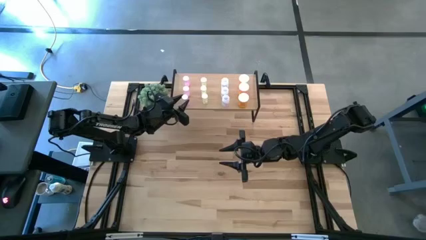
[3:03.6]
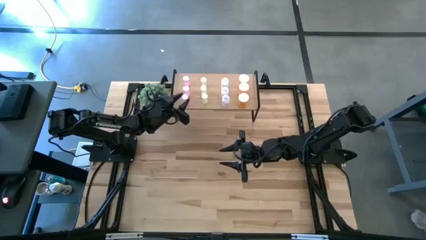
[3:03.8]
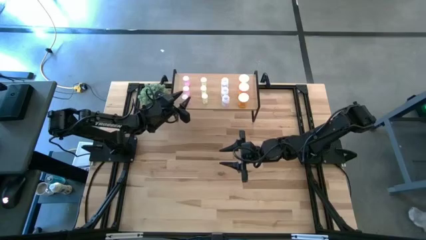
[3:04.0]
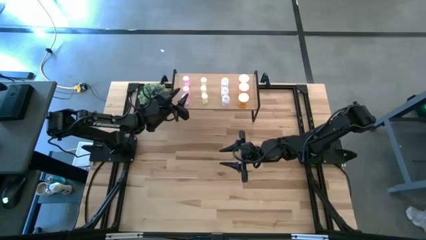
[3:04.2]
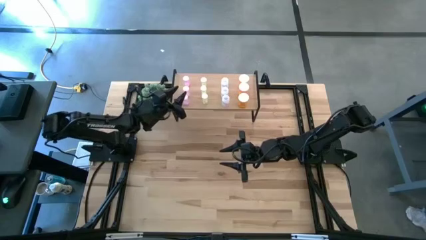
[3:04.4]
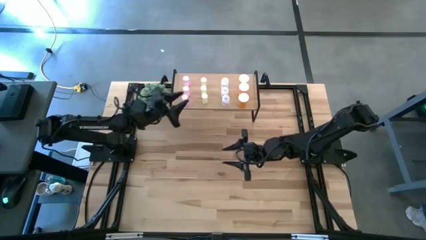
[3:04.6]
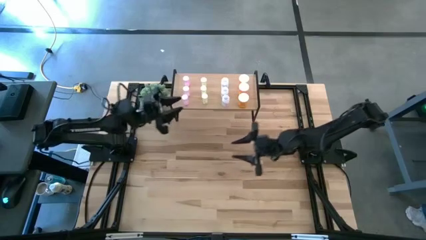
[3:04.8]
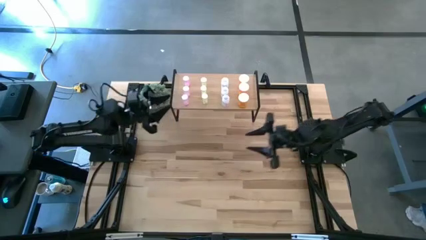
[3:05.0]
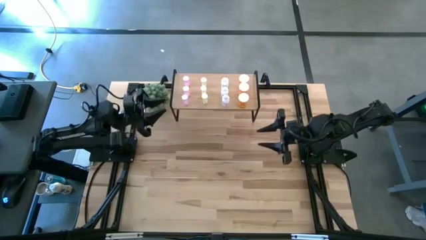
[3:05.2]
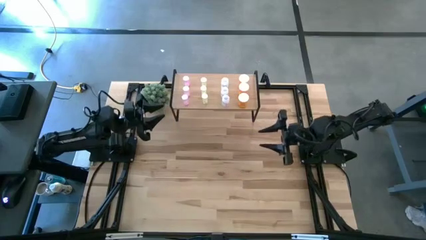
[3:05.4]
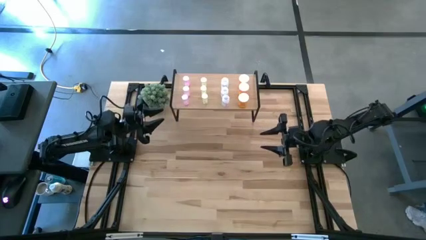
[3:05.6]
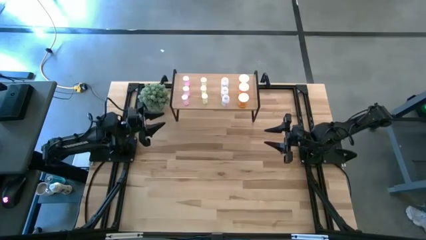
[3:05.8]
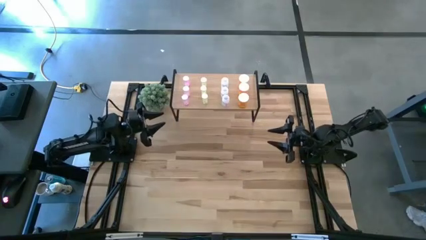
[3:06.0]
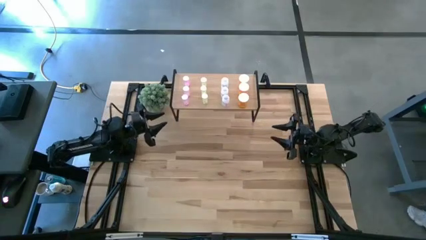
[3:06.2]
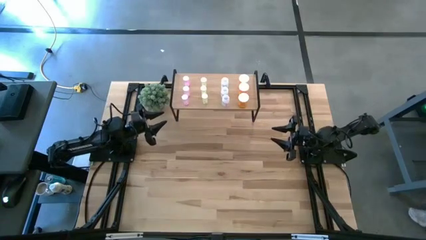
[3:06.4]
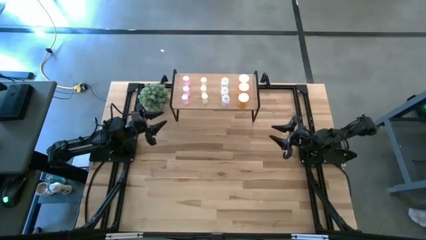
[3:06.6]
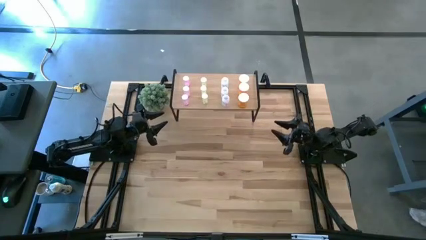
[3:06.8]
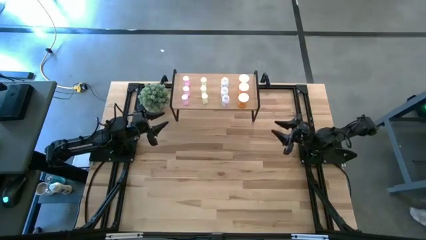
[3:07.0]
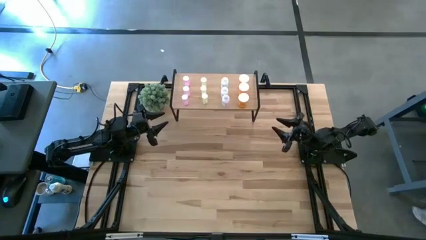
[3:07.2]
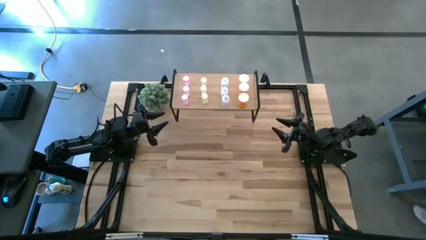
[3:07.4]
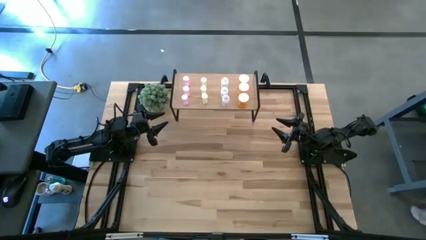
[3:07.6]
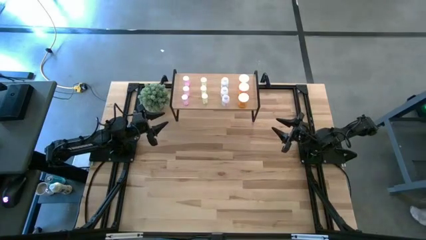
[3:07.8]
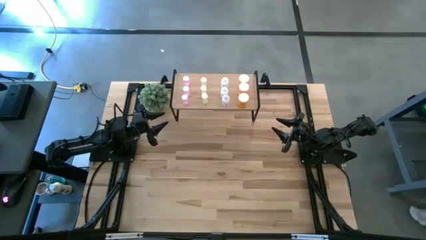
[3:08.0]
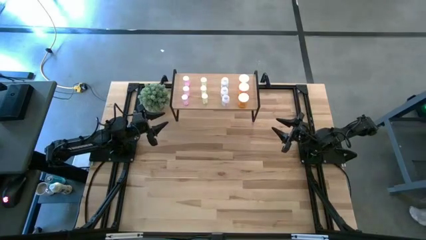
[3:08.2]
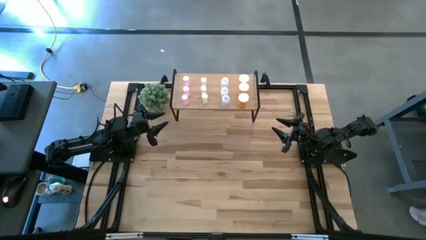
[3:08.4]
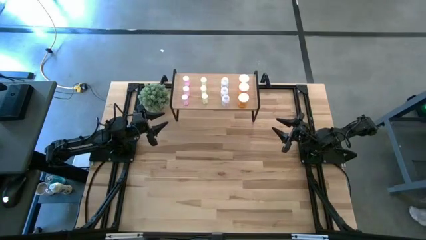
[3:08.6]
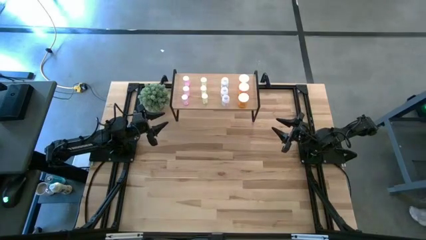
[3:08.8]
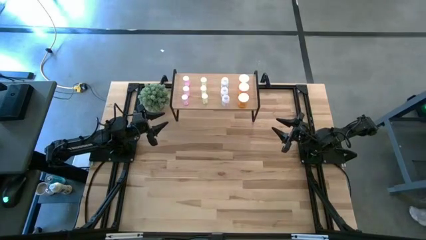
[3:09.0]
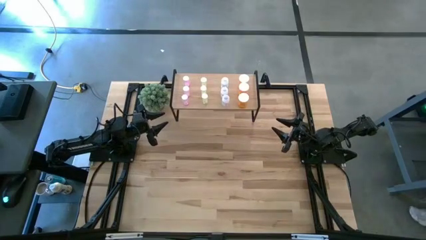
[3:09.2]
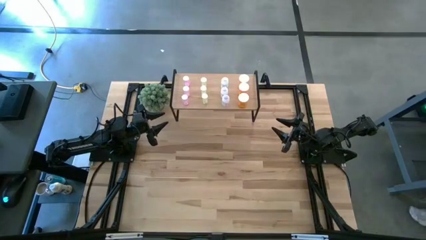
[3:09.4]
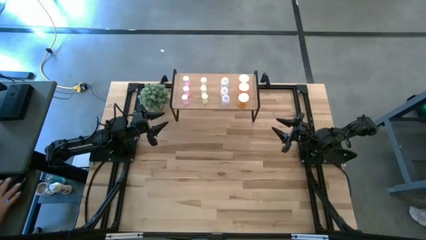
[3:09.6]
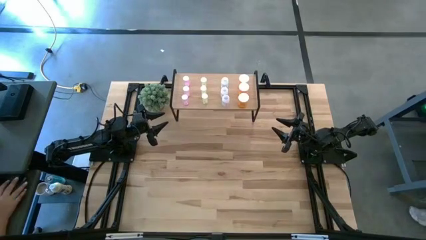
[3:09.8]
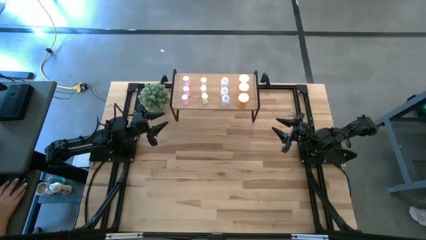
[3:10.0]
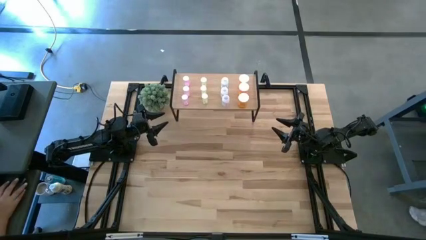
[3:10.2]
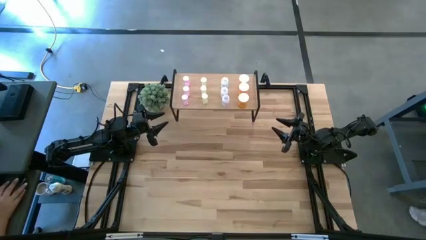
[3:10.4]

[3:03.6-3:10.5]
Task: Pick and place medicine bottles onto shelf by color
Return to Home position

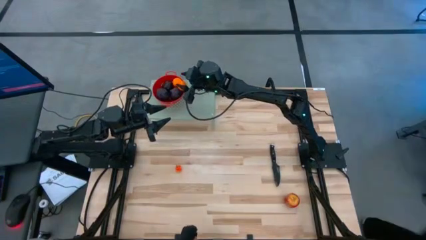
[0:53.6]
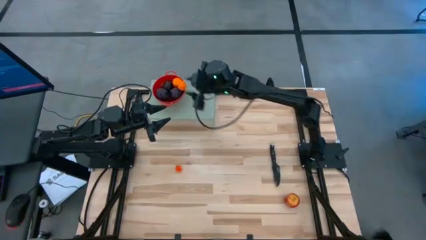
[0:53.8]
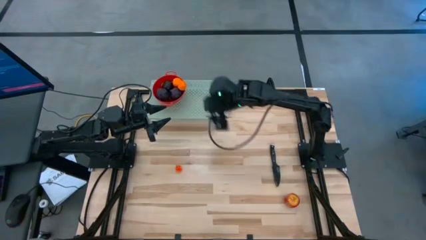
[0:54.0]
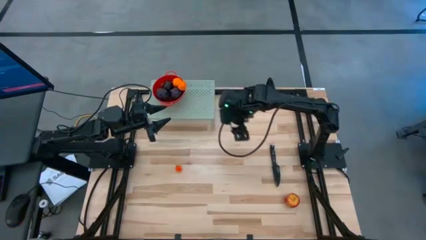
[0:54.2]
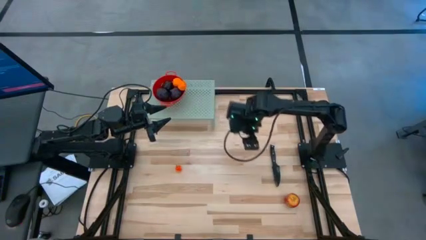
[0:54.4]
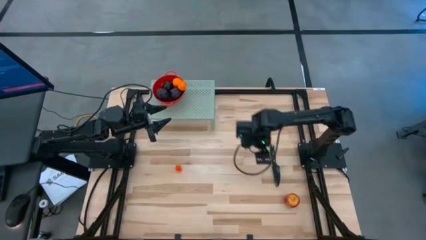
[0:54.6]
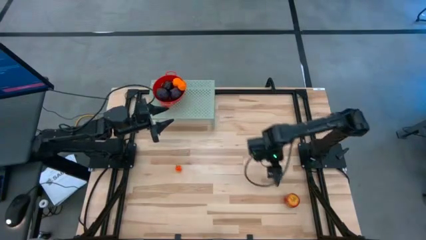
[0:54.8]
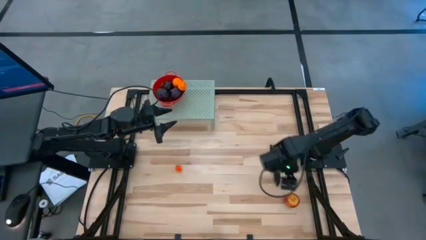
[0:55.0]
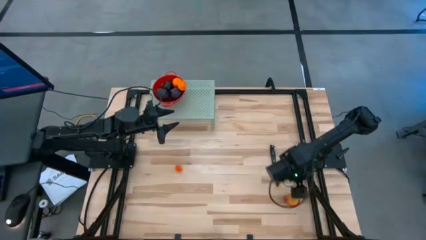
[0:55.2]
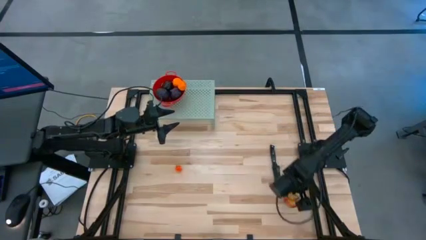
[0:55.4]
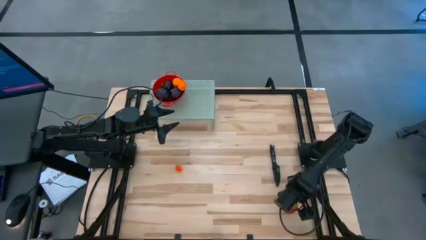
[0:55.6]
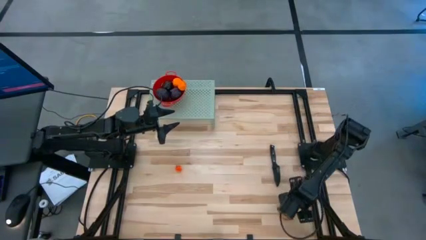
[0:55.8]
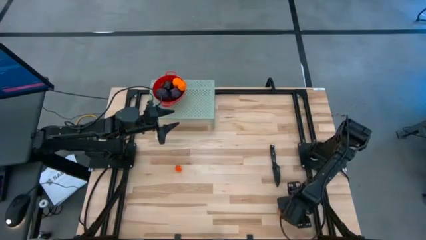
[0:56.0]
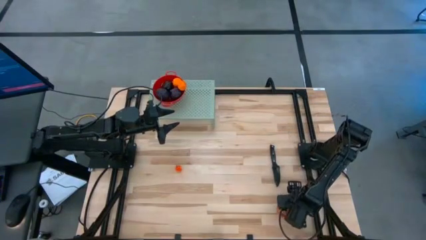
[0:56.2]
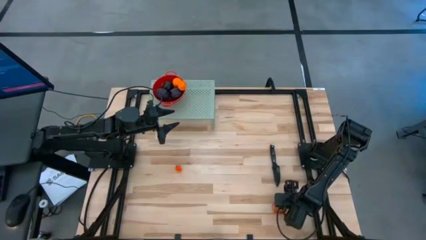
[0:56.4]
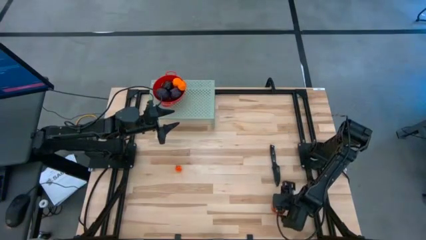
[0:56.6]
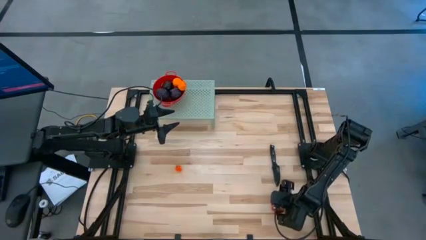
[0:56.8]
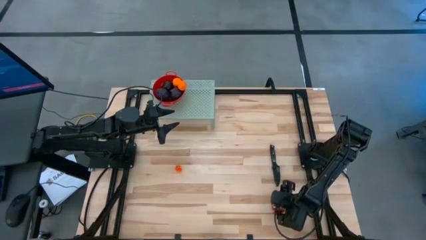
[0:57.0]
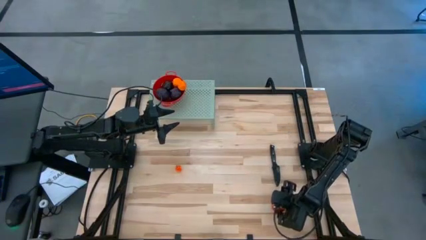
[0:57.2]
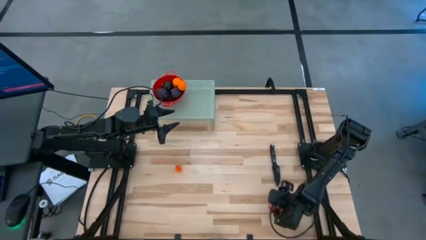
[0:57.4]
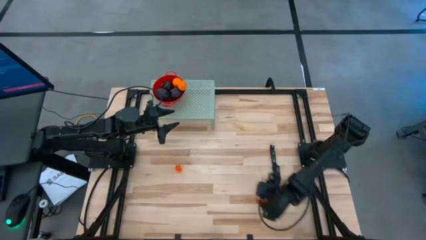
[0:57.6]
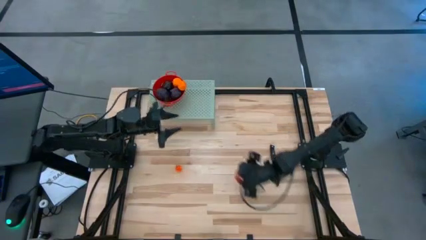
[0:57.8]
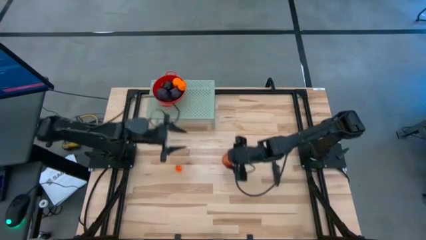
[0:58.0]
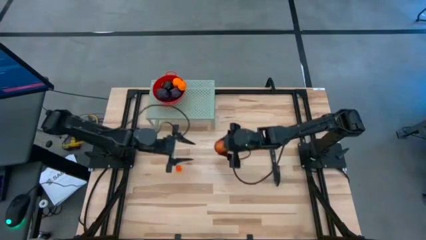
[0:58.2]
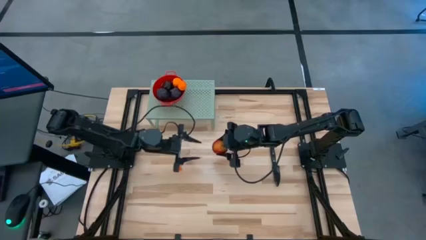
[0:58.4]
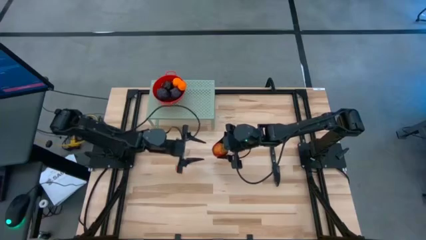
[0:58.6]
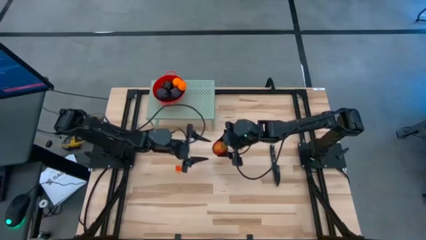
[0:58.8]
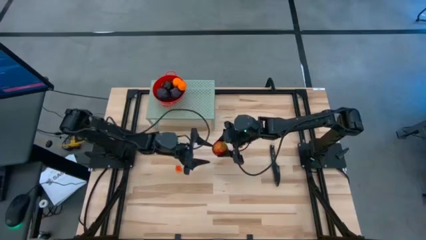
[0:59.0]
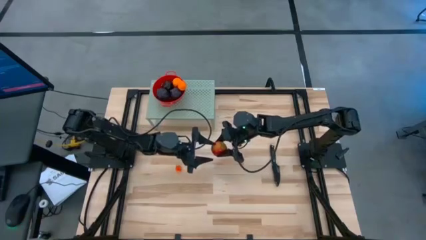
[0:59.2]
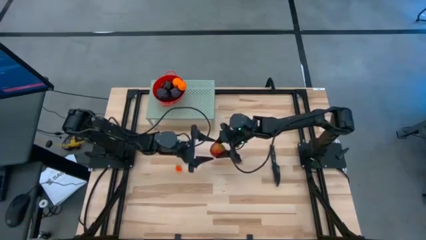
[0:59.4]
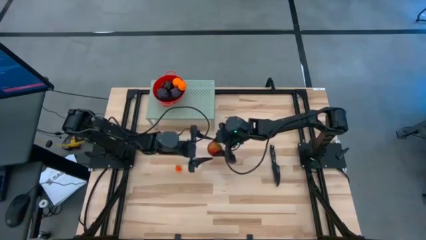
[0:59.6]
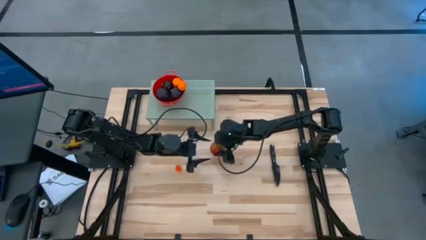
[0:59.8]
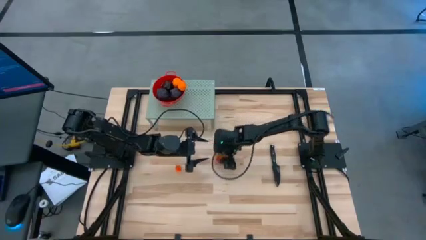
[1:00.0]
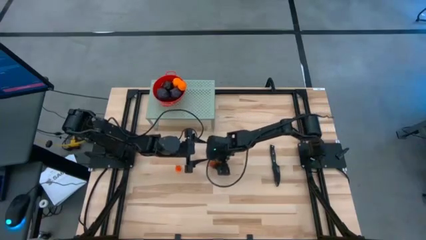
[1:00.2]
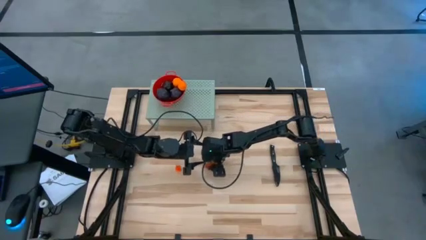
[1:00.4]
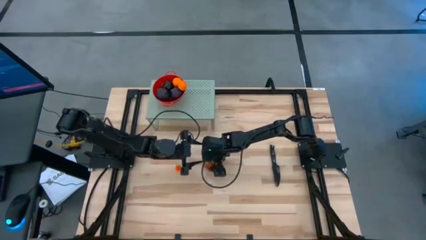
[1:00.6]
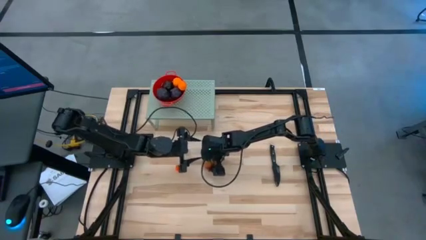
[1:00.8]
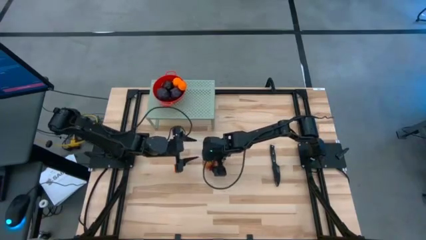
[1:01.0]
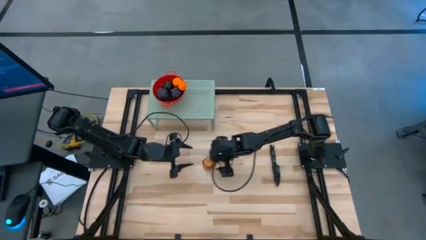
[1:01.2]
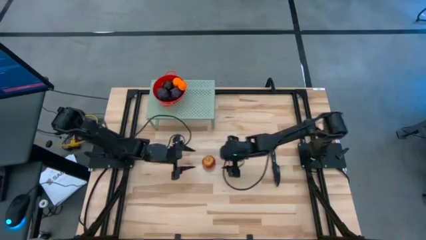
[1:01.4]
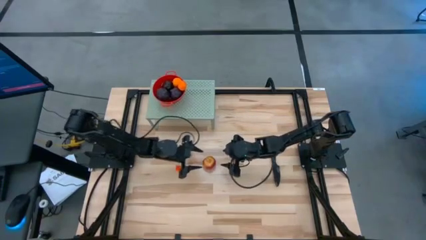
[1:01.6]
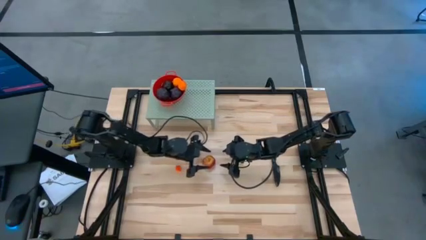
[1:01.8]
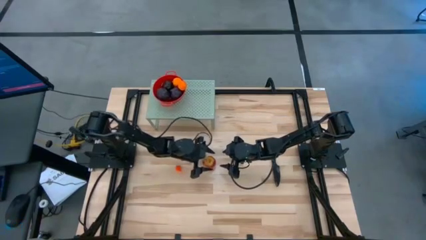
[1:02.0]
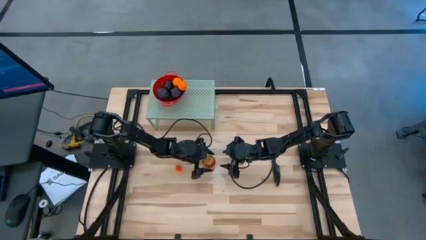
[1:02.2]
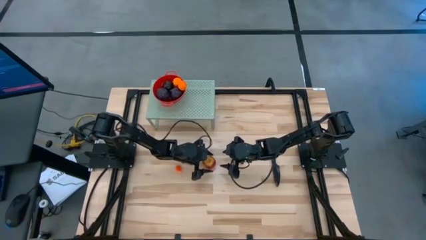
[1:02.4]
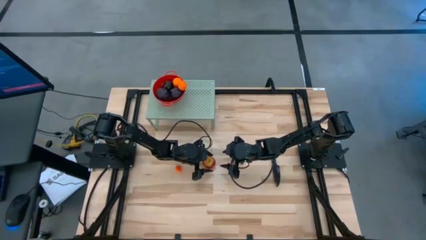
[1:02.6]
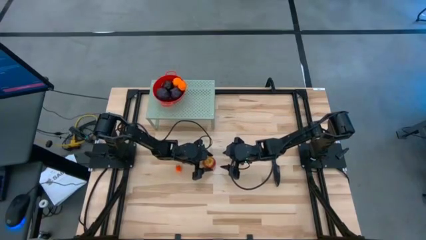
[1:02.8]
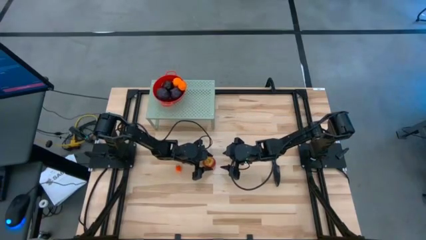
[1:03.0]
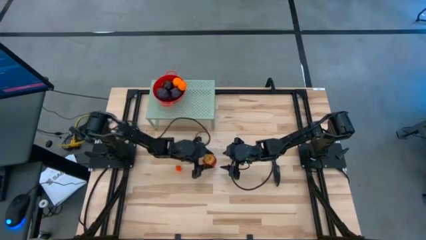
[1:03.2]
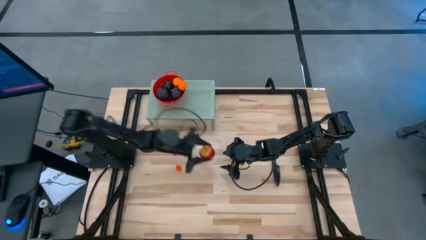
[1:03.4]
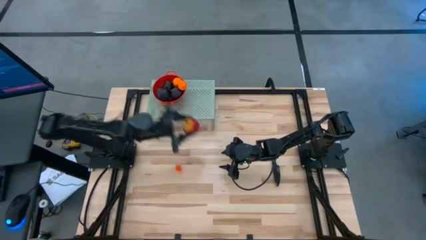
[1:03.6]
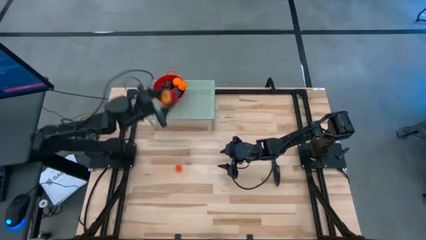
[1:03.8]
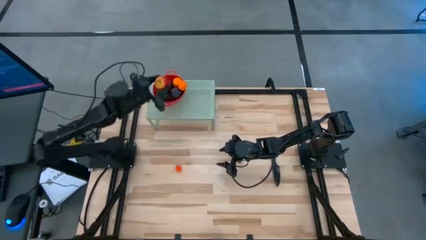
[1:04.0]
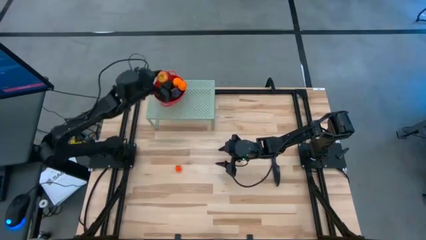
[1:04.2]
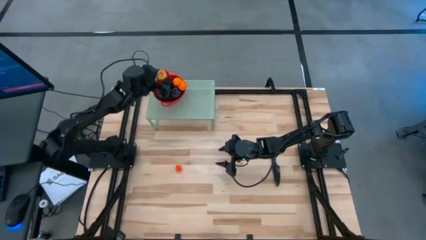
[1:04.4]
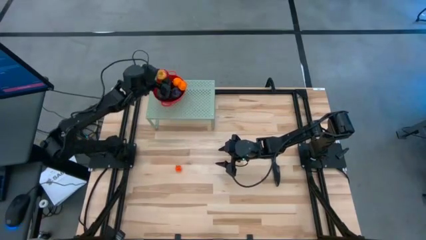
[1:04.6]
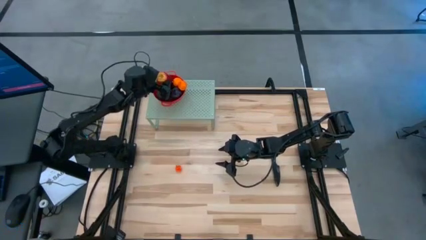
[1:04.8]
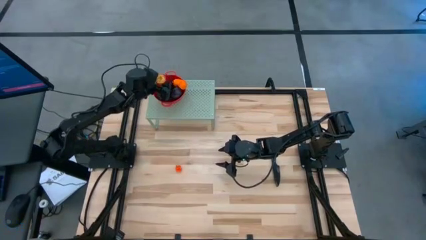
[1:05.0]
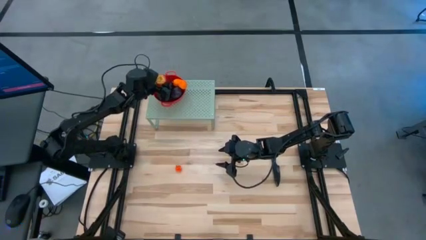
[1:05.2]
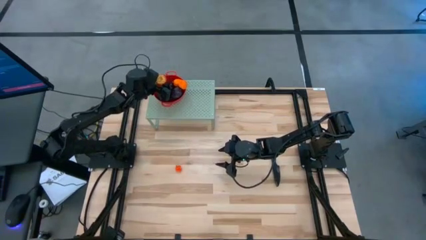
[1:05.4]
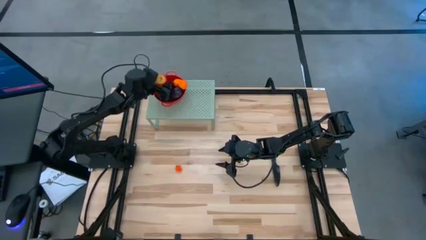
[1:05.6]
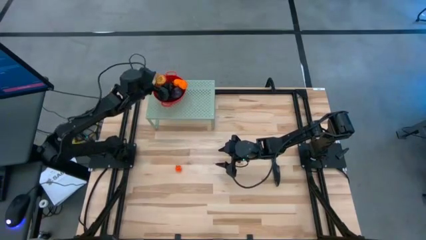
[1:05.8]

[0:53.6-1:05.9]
Task: Pick & Place Fruit
Put the red and yellow apple into the red strainer bowl
